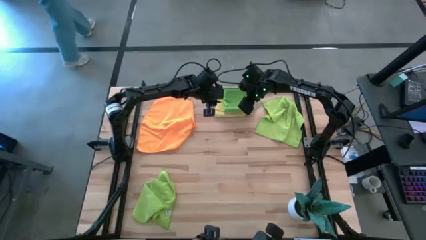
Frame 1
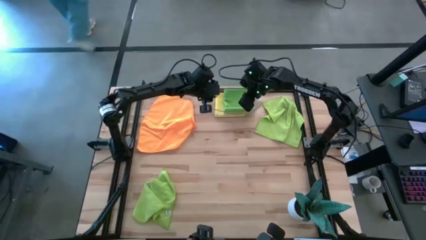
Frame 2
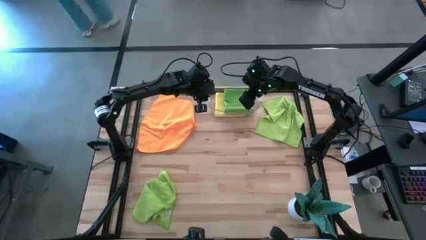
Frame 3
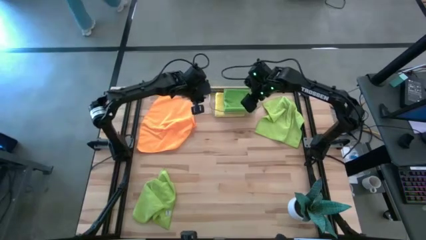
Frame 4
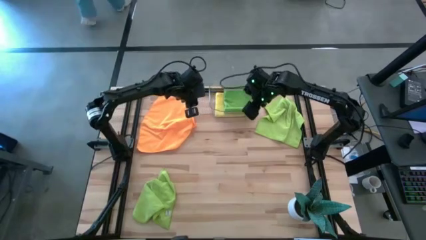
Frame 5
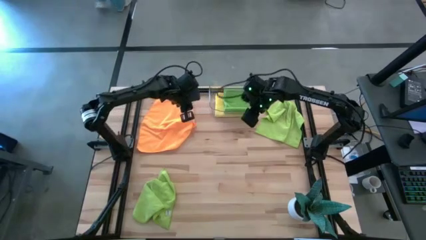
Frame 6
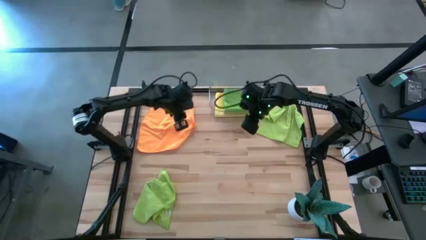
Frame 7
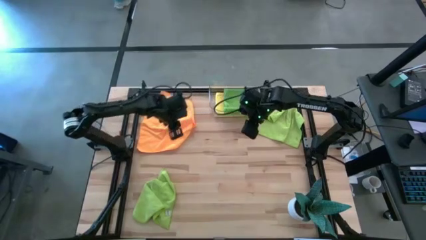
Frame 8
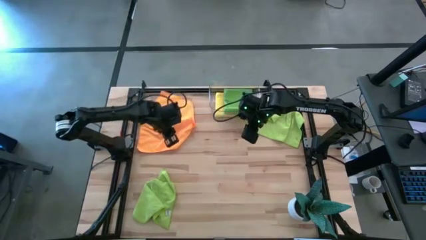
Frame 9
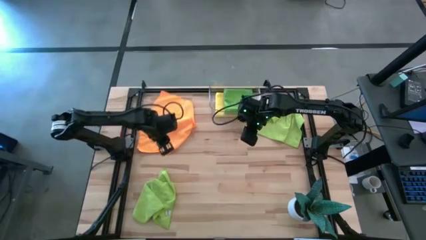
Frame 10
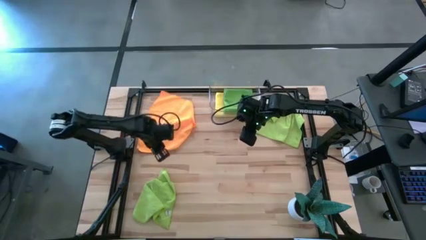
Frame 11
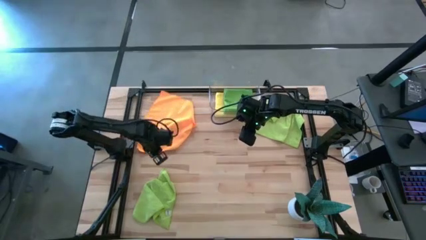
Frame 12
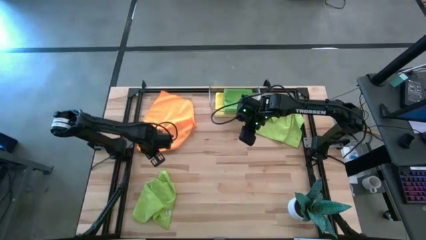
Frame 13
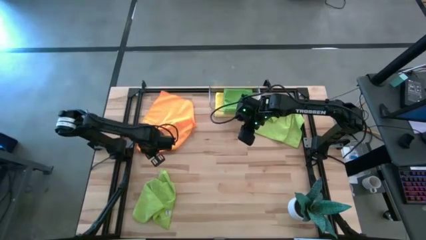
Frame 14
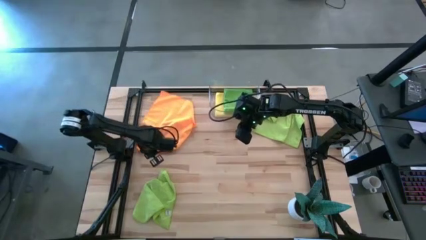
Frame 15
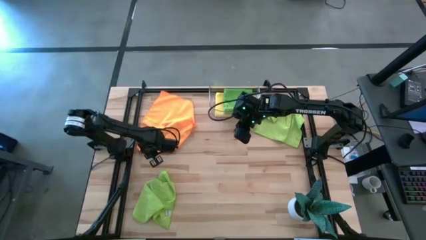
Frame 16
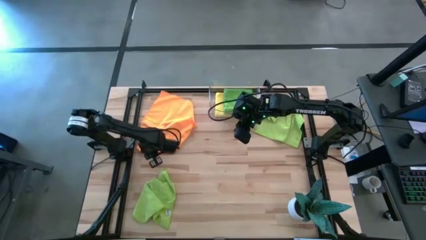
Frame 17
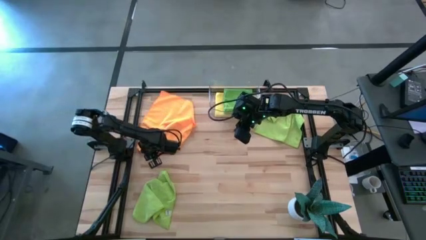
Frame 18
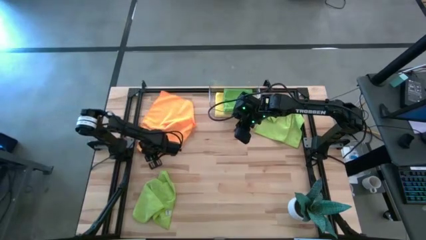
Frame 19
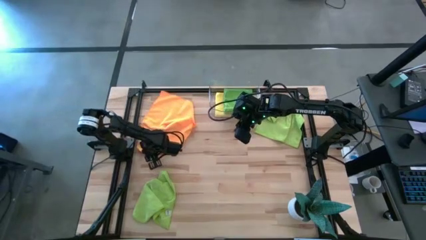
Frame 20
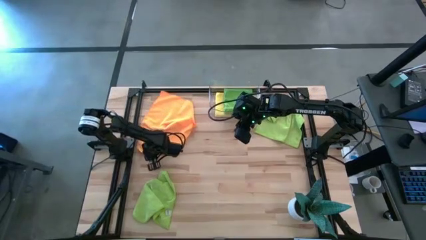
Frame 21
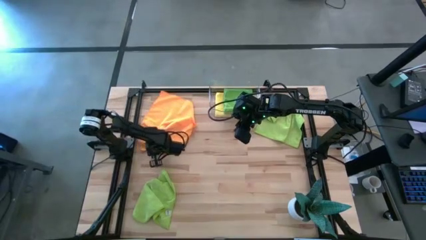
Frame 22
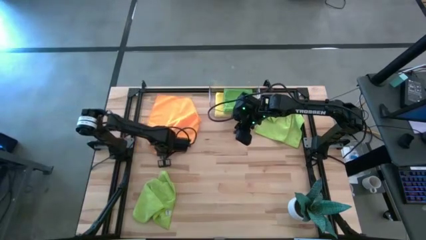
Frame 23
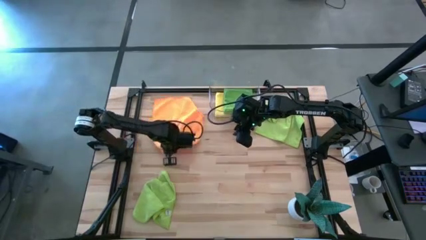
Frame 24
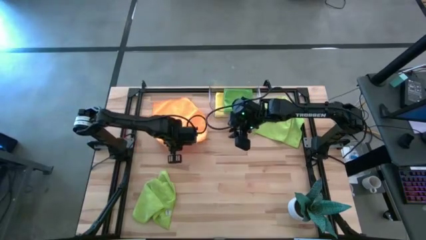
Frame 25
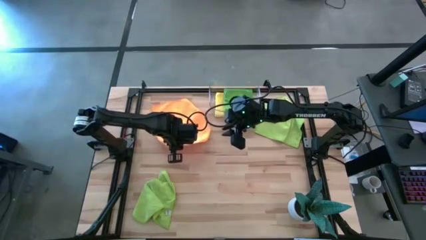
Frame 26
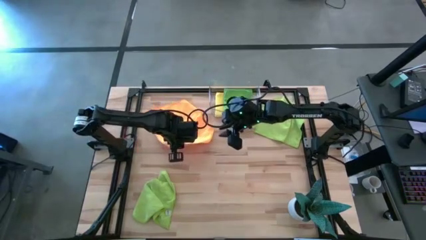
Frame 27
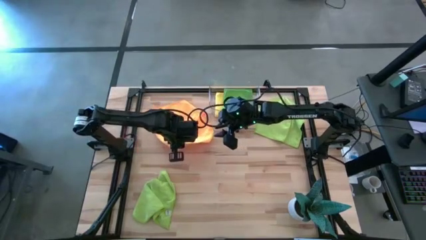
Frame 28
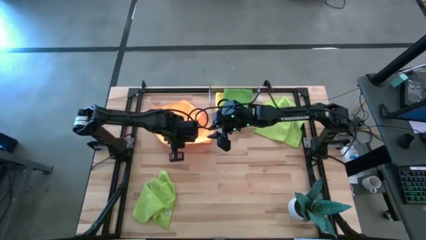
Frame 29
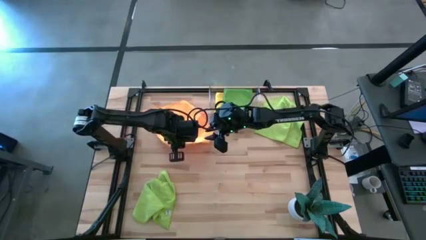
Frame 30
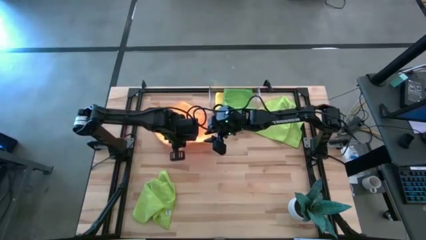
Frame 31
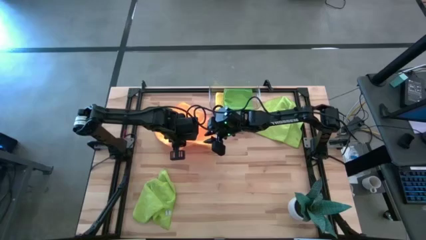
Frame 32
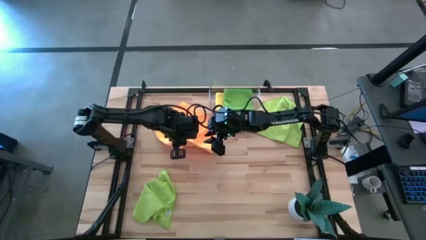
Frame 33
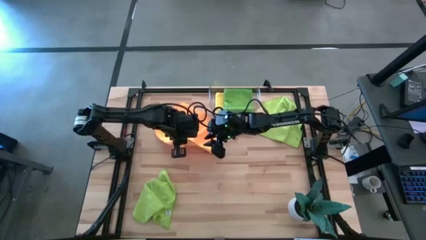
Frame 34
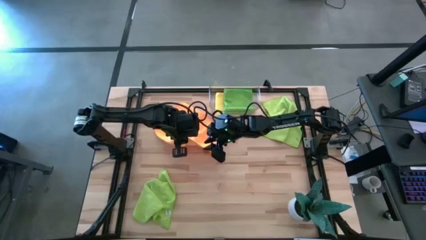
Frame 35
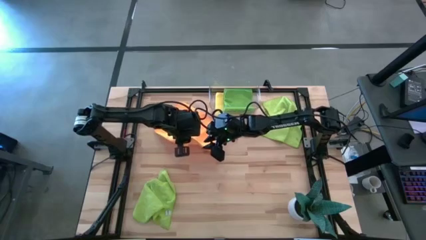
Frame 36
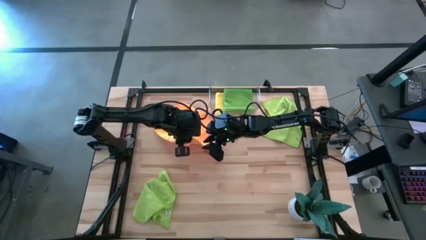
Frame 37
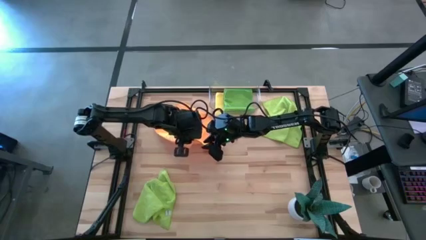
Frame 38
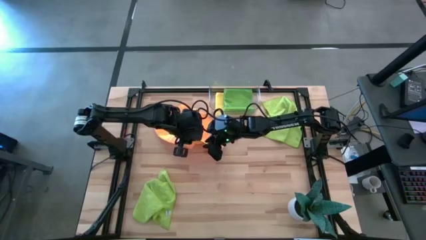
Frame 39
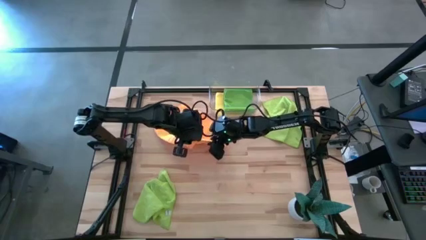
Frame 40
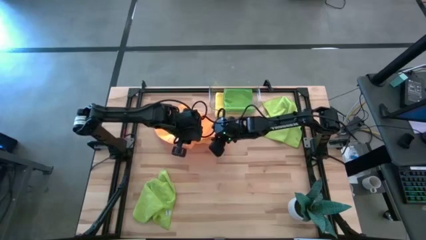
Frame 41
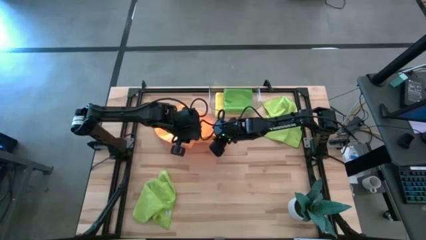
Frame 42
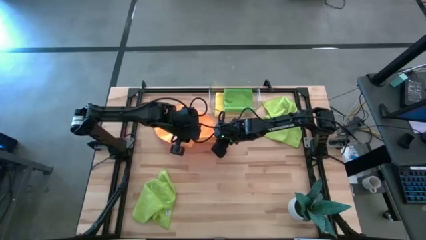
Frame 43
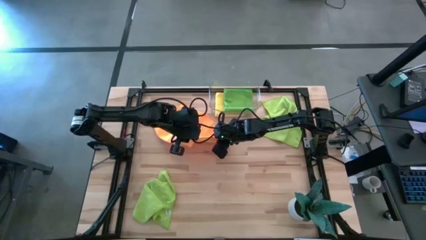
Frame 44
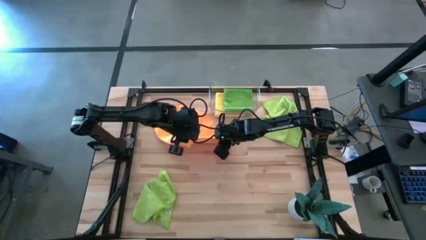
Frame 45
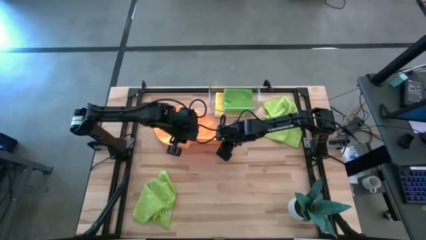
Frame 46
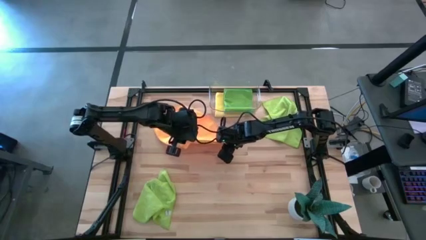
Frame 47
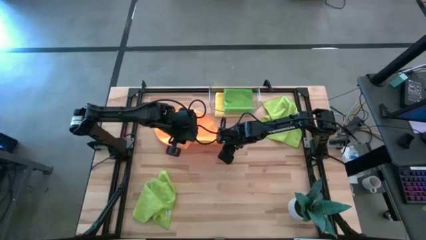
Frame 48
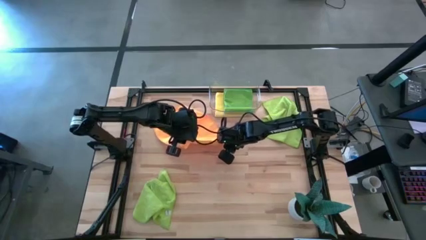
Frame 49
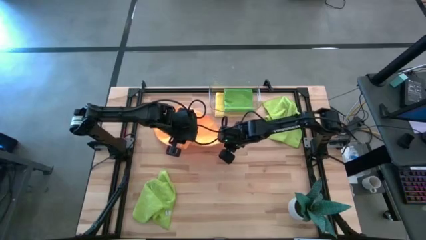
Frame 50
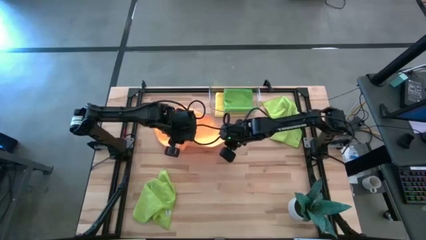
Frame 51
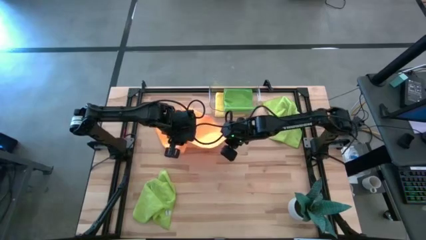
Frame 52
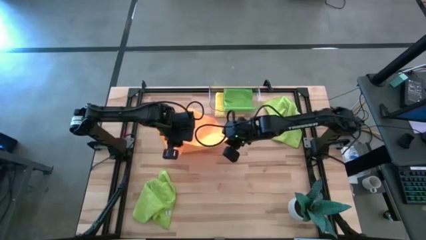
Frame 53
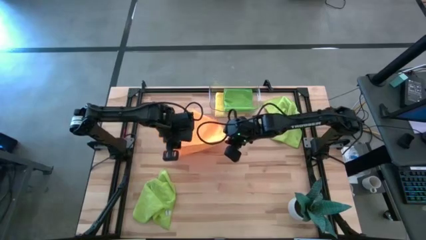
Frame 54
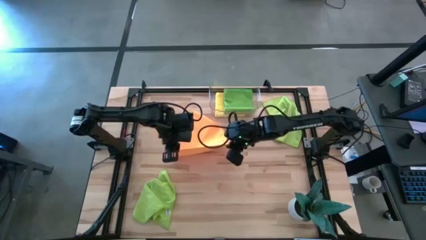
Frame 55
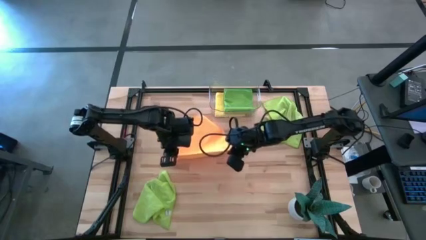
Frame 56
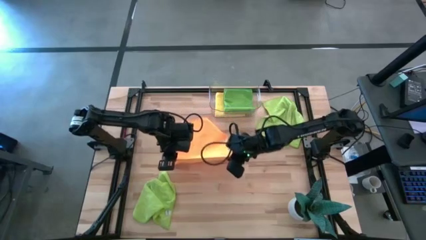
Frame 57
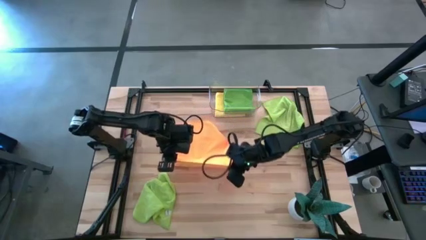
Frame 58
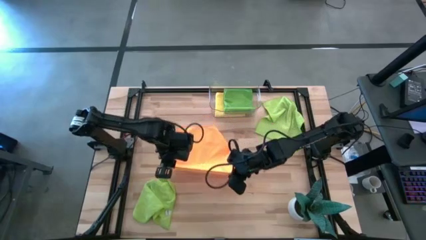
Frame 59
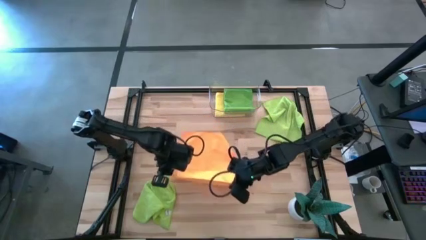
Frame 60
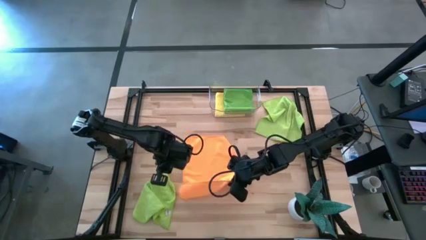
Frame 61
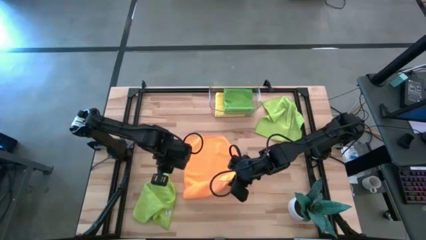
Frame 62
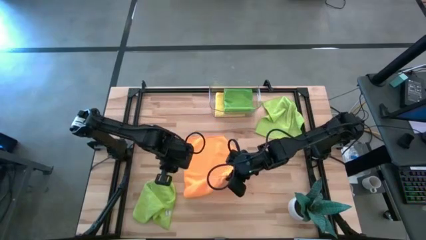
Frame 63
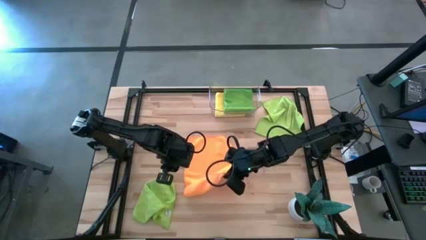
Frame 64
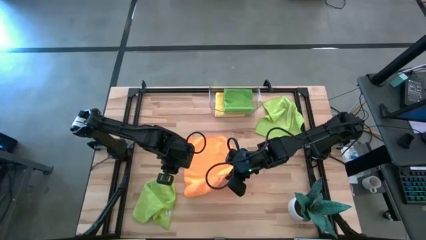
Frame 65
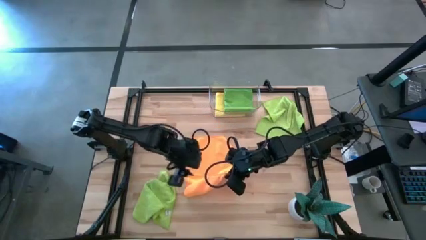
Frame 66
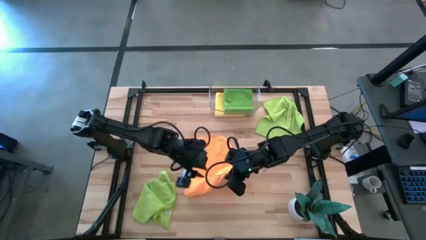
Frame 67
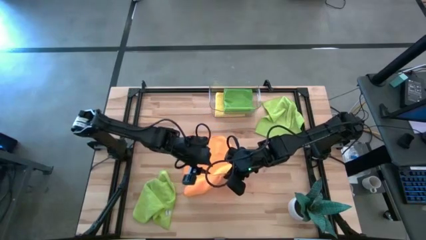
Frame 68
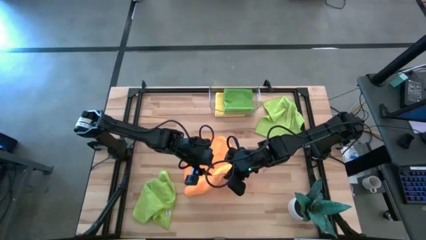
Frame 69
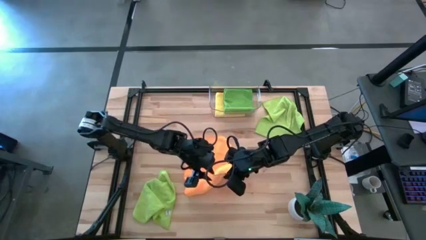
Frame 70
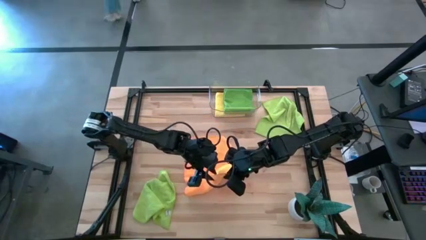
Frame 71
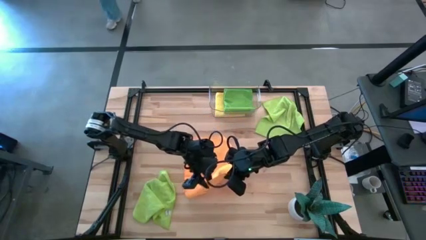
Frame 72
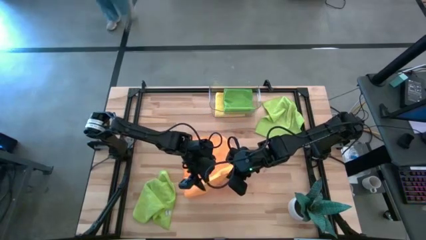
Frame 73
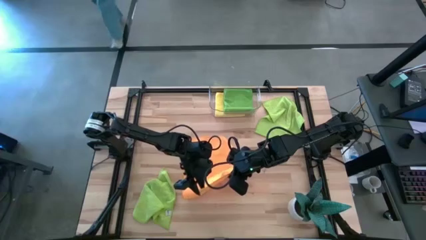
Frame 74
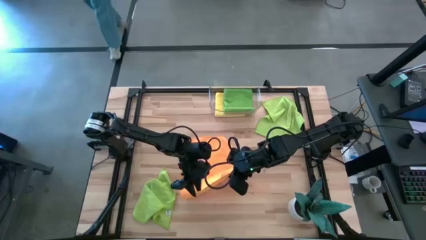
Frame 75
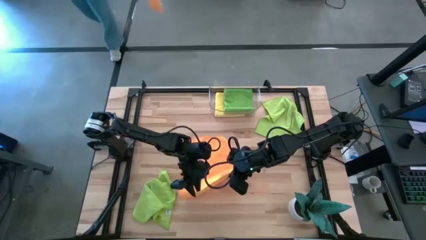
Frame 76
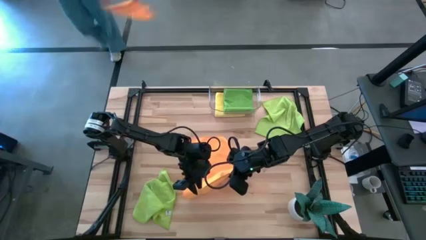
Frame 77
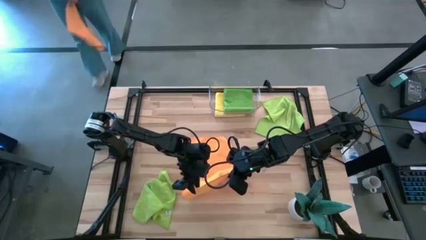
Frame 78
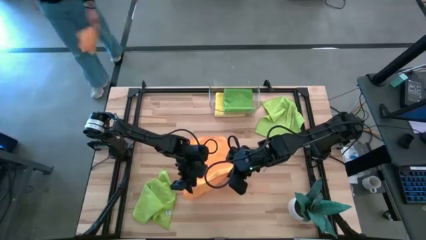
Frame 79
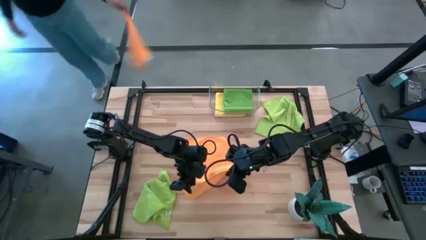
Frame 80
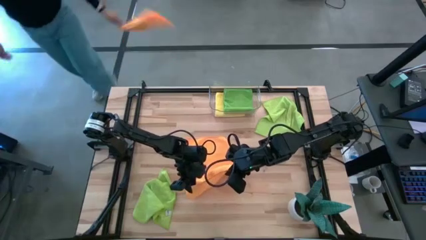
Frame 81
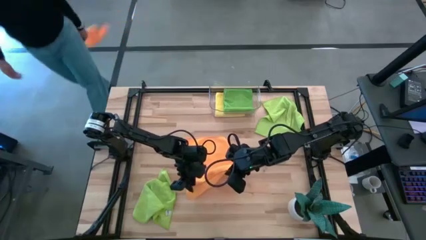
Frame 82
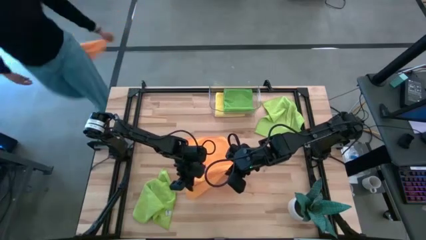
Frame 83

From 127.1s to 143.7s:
Task: Fold microfiber towels
Fold the orange microfiber cloth
